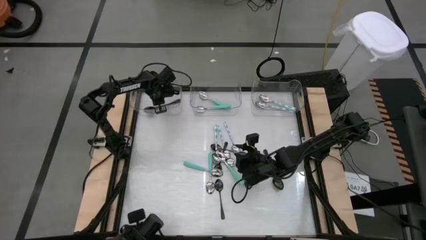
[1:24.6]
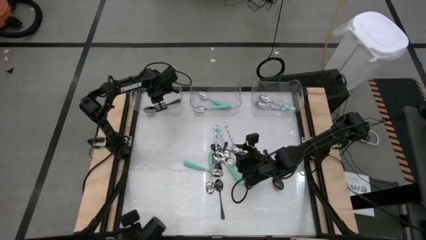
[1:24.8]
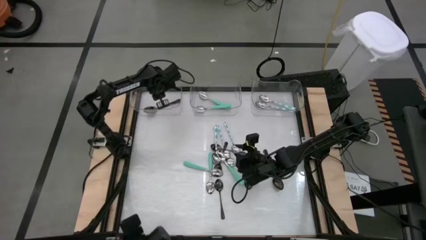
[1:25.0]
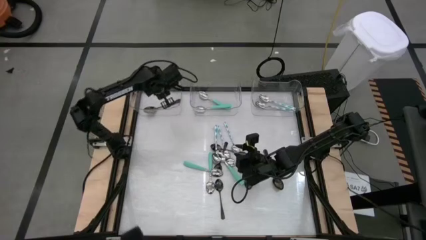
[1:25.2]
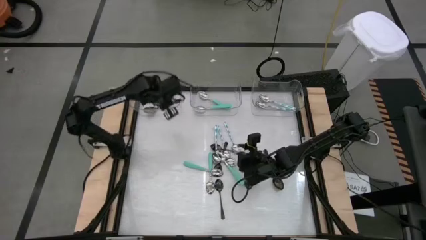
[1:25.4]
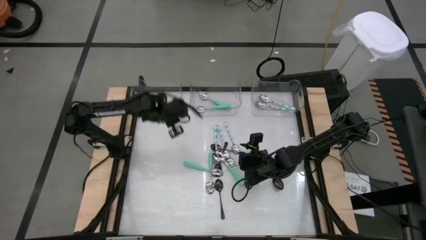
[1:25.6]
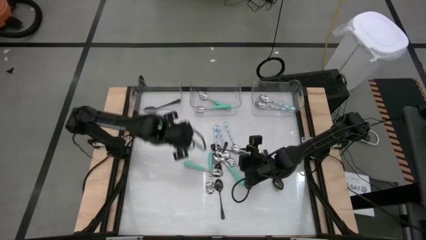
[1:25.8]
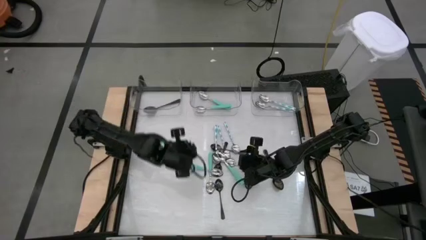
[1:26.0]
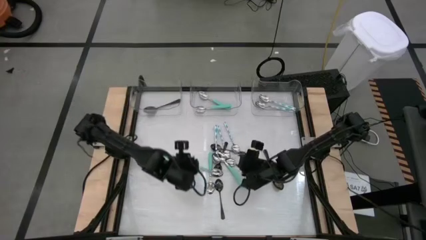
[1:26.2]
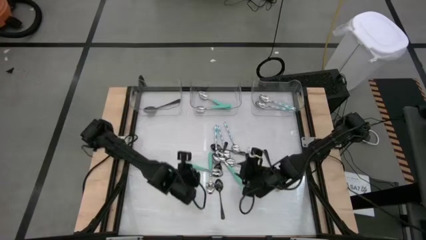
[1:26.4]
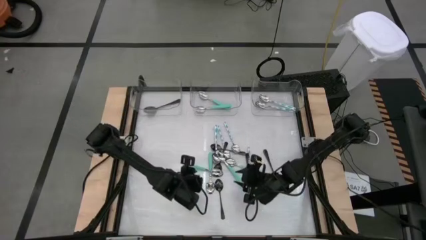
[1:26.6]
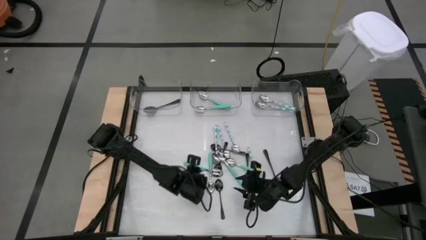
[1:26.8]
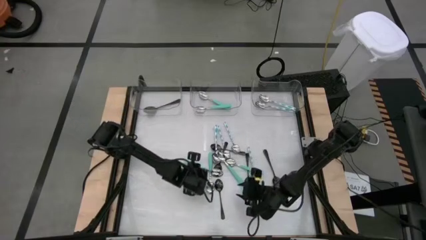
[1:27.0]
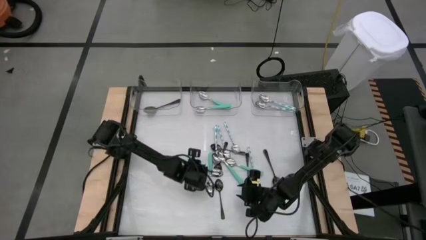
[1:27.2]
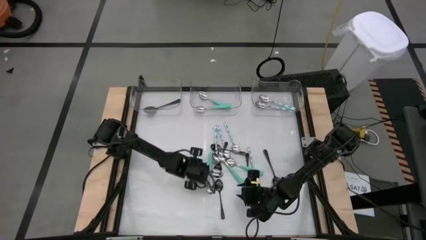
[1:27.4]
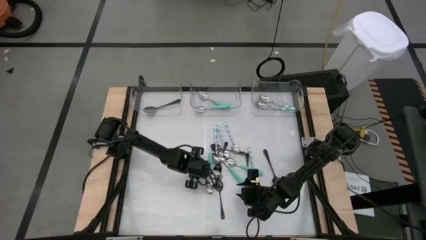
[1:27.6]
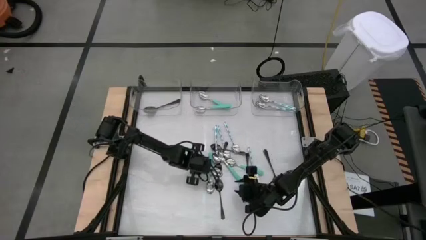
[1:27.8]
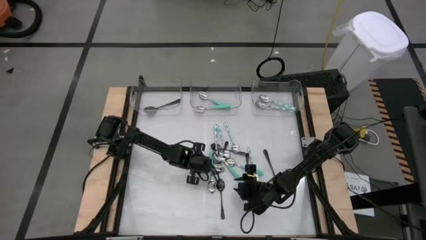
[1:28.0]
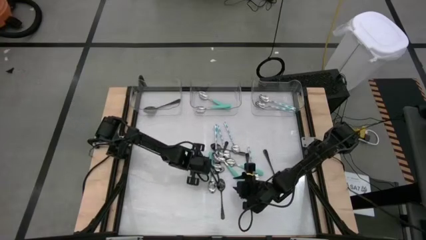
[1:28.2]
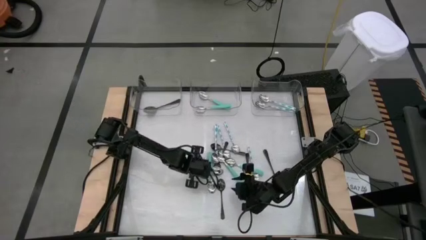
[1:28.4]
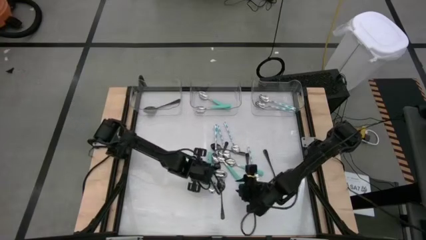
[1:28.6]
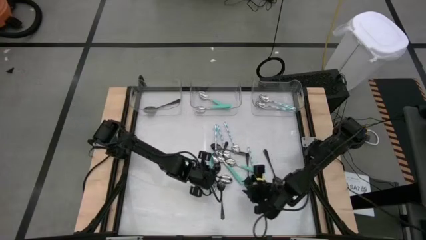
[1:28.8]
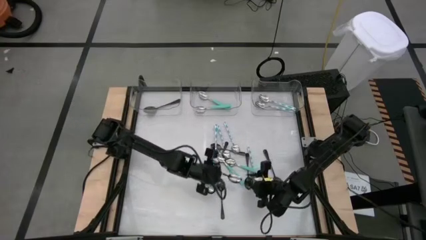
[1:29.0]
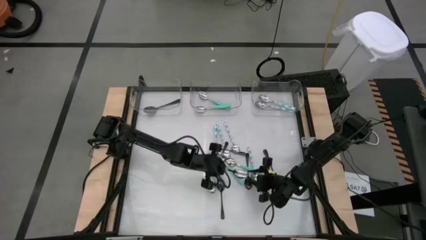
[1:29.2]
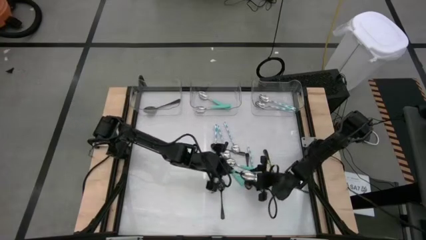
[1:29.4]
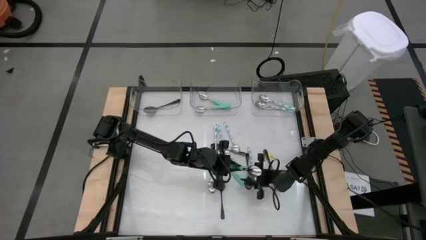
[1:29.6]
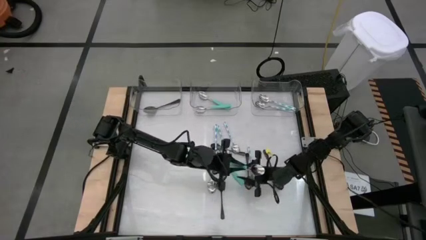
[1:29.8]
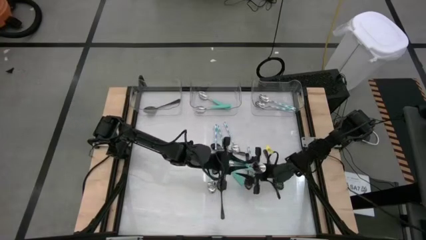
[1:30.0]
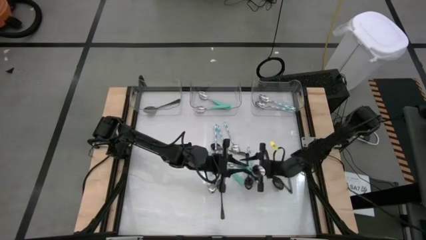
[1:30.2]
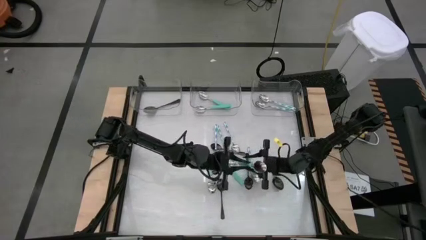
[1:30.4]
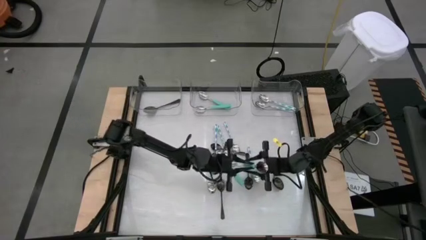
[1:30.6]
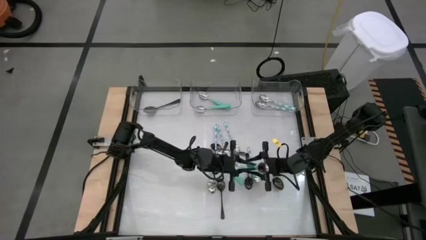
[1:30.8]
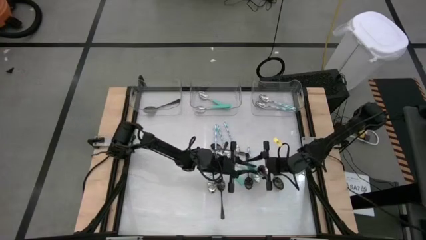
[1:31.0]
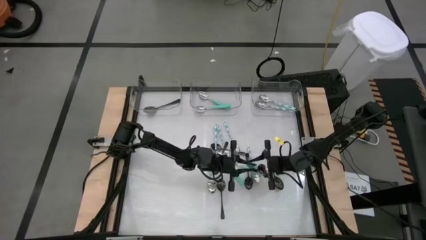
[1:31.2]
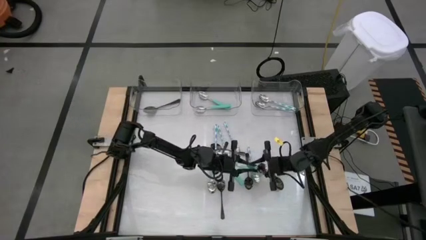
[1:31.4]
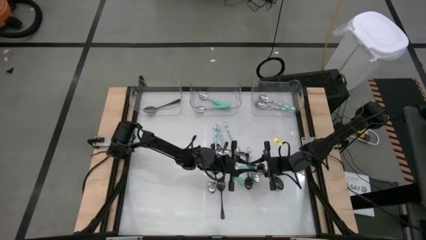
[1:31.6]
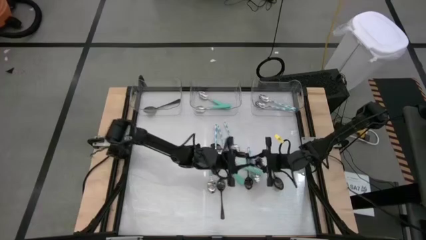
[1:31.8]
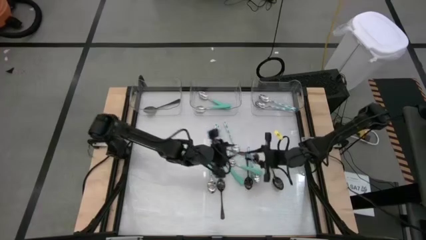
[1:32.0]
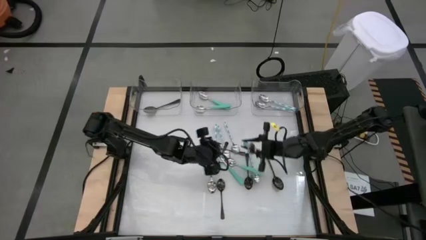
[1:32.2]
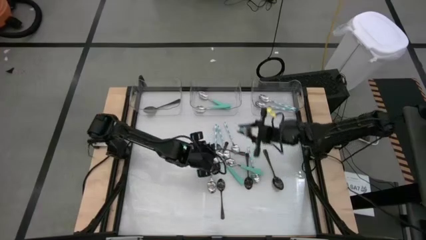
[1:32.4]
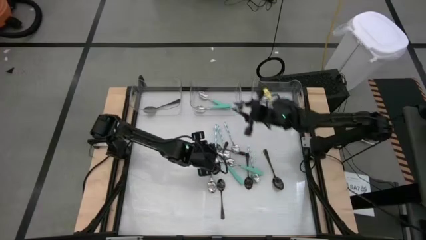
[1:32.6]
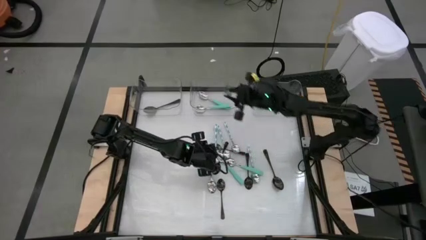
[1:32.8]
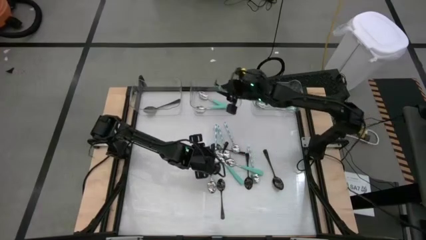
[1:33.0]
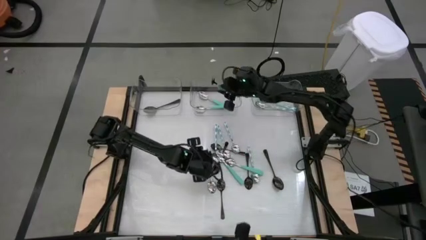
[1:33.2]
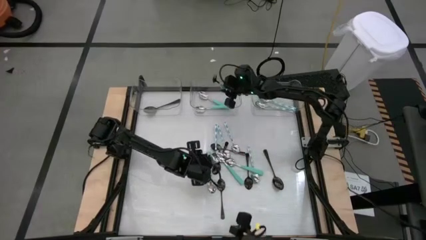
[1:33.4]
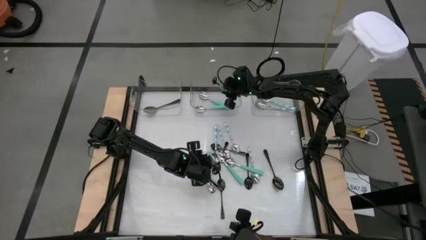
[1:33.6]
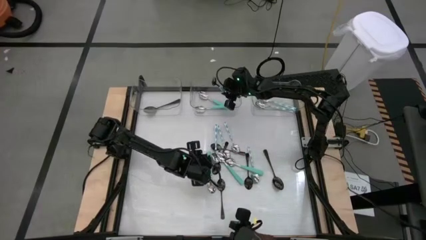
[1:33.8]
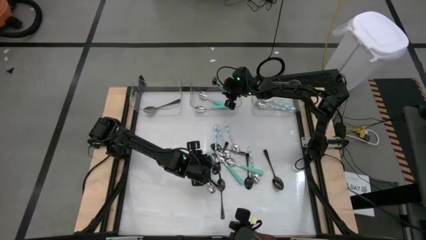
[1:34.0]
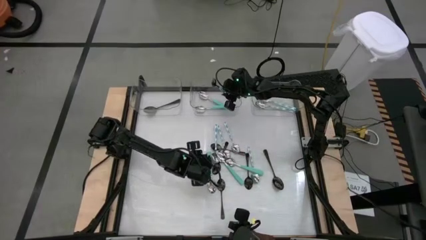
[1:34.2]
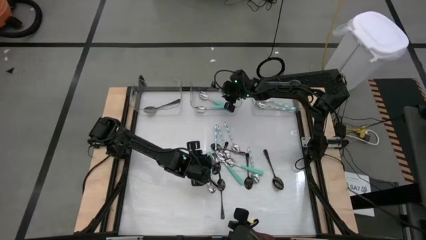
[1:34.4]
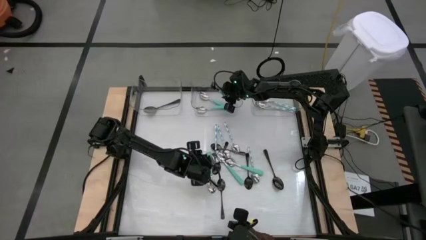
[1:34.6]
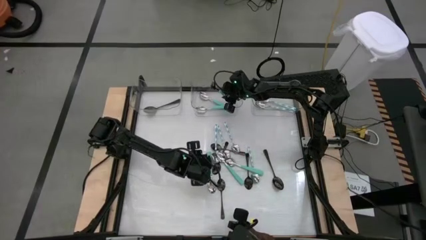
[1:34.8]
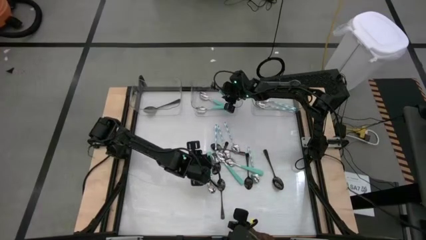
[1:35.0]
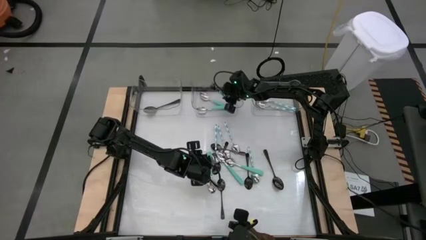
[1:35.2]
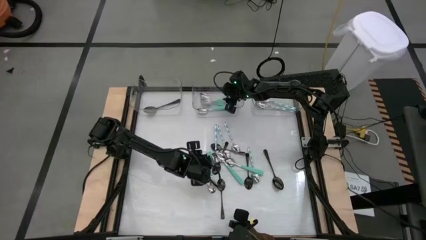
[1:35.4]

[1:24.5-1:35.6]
Task: Sort silverware by color (type)
Put the green spoon into the center transparent bin
